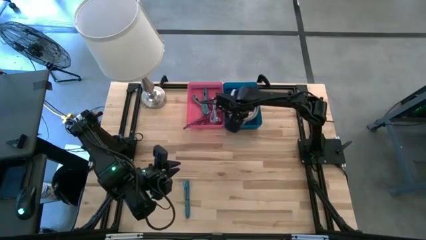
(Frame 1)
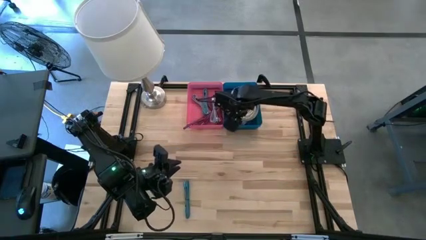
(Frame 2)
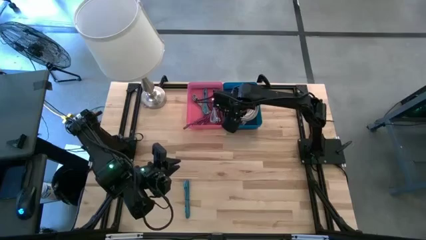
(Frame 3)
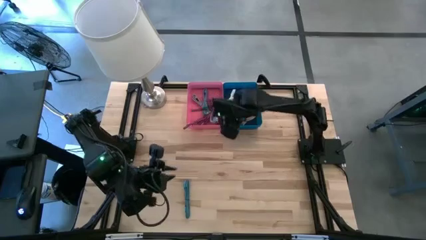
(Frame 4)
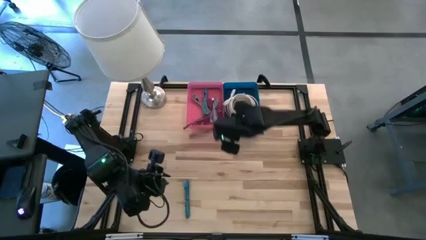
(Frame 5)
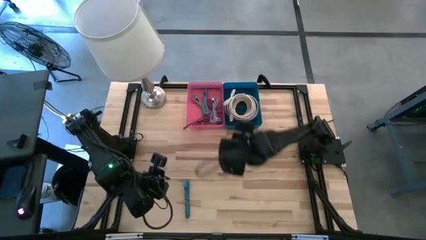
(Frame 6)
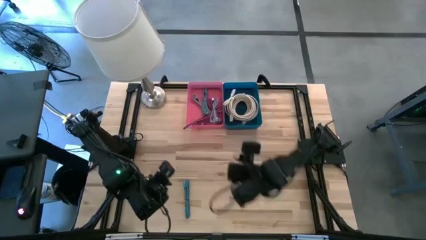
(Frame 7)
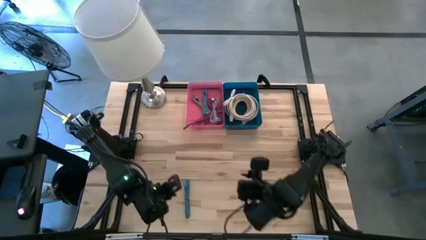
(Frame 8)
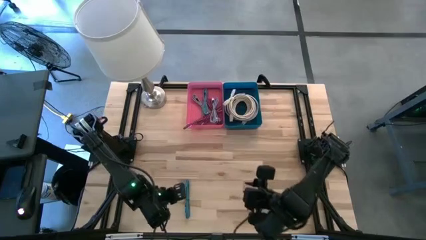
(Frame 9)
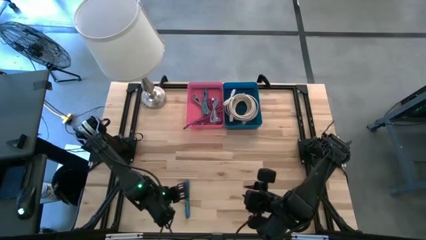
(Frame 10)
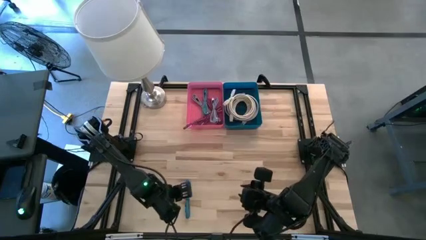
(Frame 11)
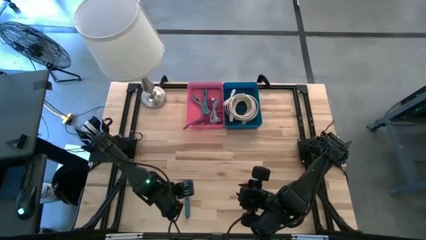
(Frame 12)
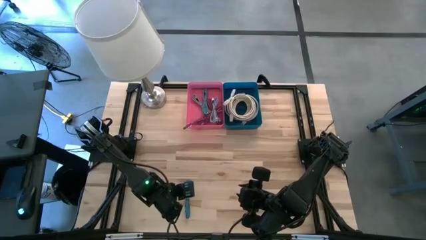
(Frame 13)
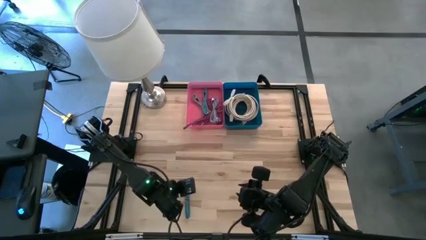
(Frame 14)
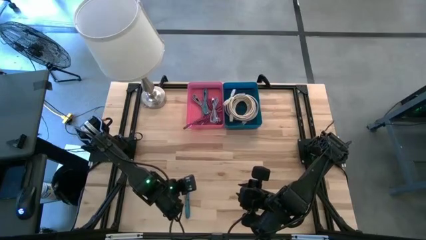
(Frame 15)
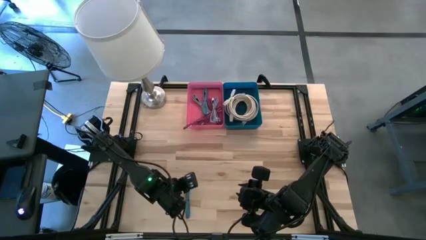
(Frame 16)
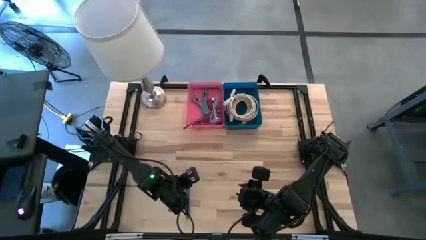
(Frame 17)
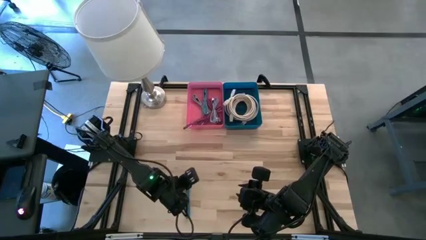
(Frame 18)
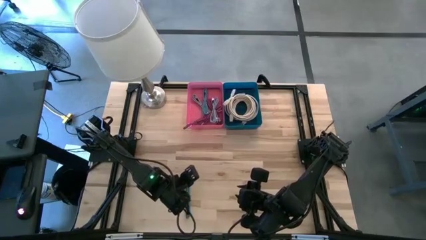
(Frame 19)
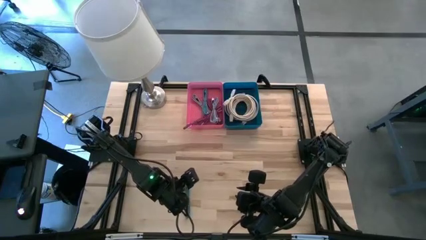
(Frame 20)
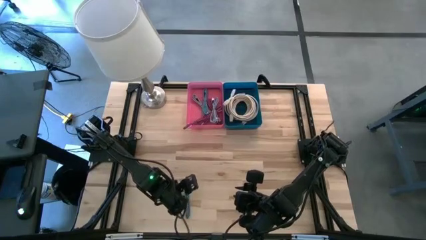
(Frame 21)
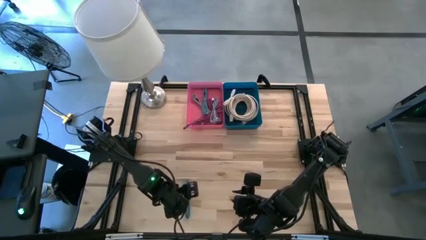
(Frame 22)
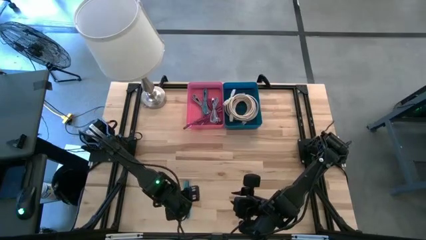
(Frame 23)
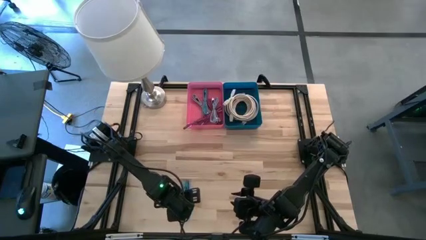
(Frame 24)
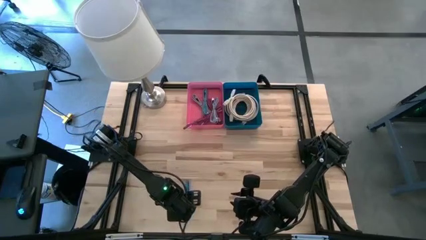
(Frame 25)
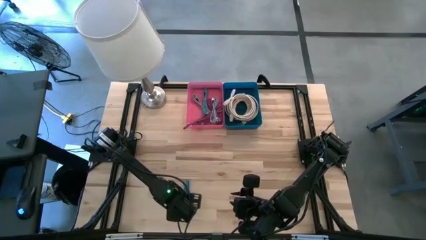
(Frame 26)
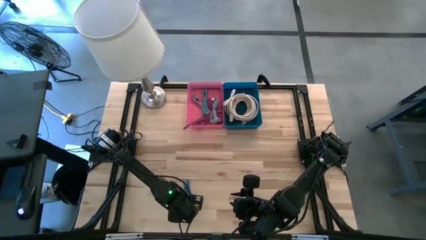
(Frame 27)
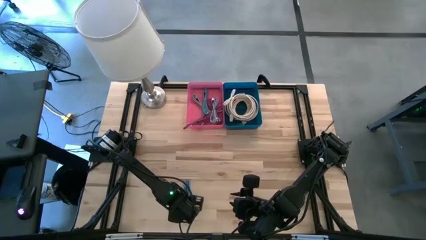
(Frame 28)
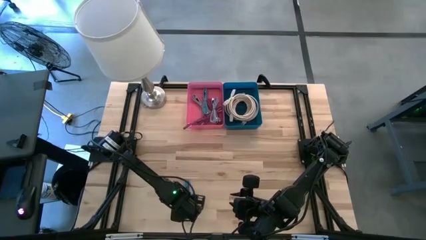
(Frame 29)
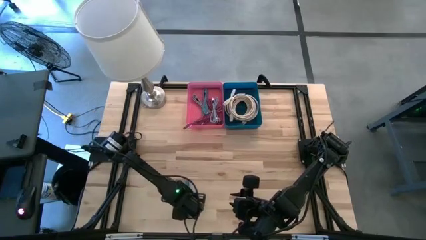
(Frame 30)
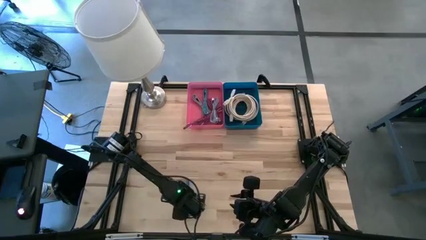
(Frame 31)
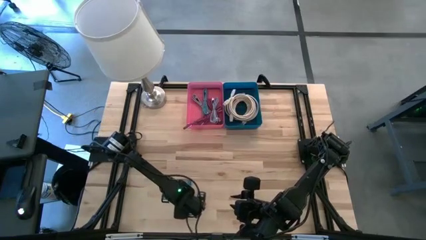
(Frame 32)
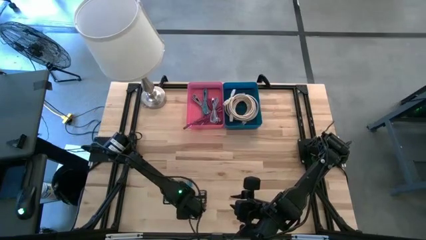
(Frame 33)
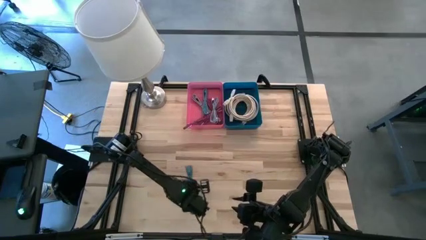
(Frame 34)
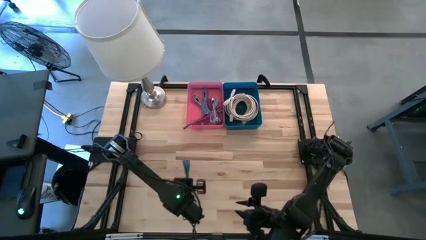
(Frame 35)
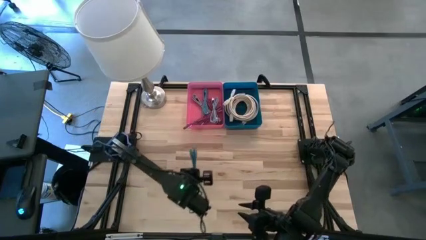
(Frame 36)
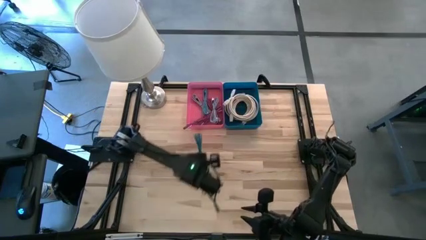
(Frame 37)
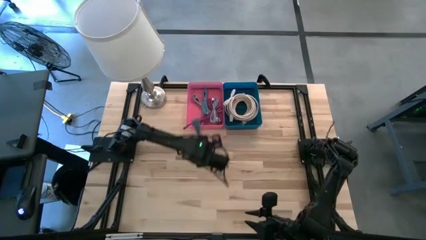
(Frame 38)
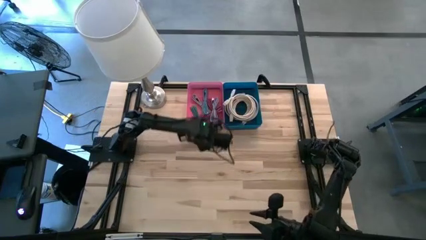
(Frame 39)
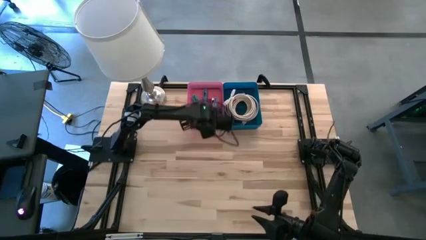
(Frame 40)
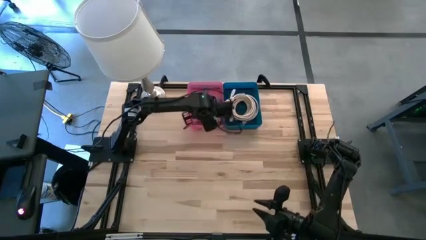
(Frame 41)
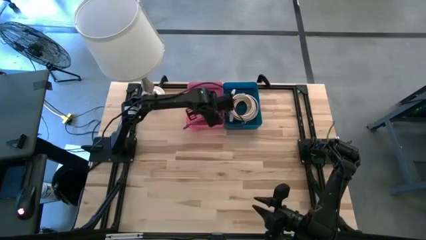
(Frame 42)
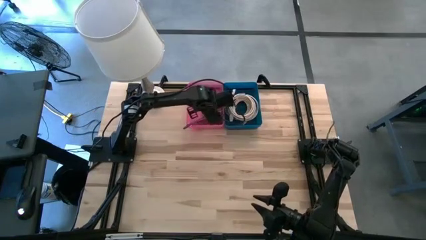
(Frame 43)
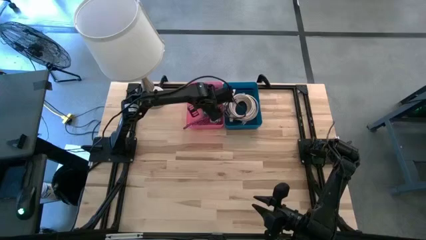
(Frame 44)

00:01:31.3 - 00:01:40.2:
Task: Pick & Place USB Port
Put the blue charger cable into the pink bin

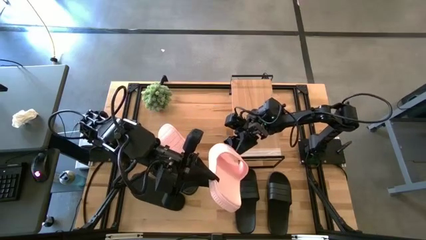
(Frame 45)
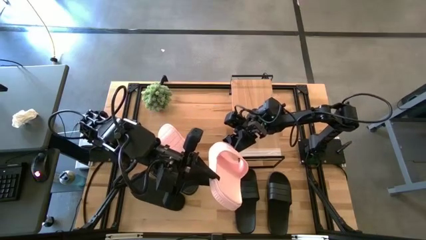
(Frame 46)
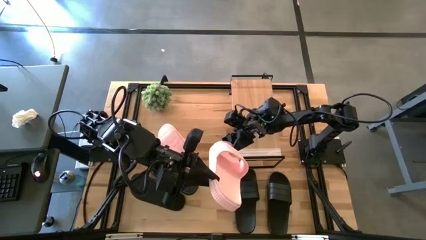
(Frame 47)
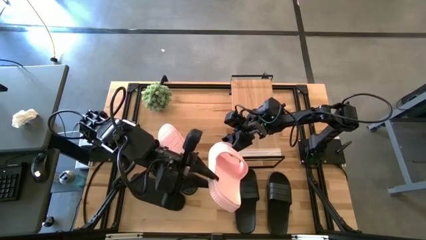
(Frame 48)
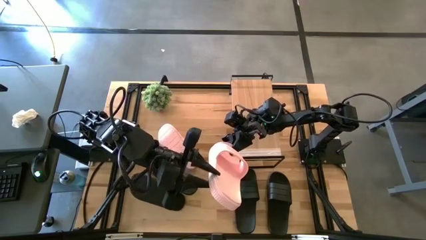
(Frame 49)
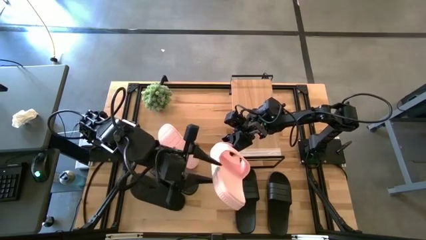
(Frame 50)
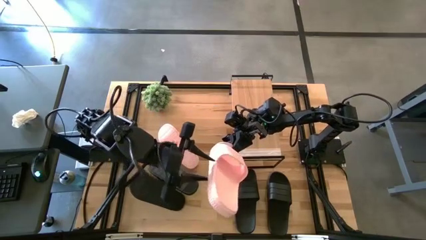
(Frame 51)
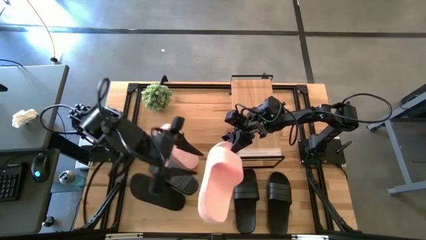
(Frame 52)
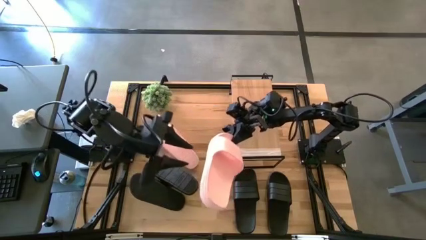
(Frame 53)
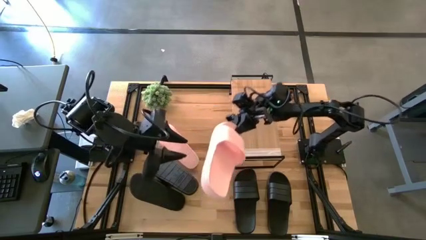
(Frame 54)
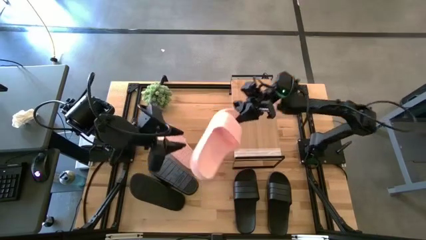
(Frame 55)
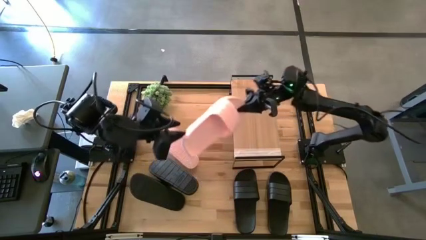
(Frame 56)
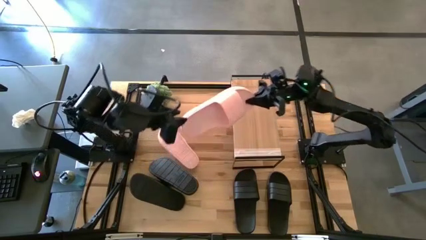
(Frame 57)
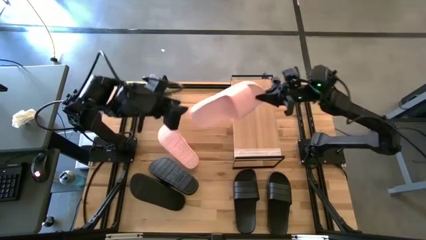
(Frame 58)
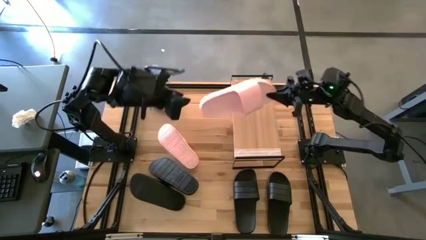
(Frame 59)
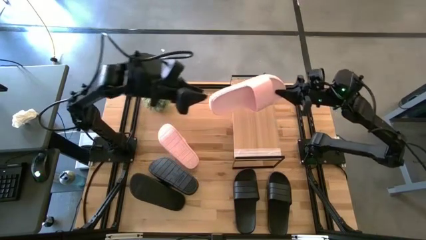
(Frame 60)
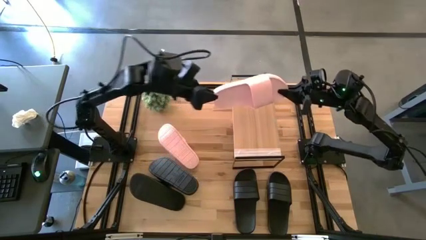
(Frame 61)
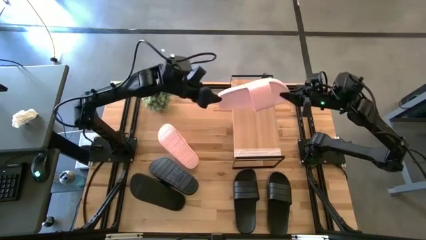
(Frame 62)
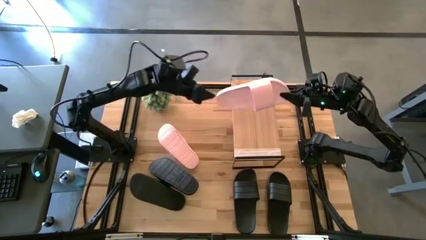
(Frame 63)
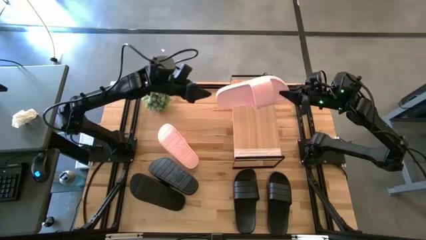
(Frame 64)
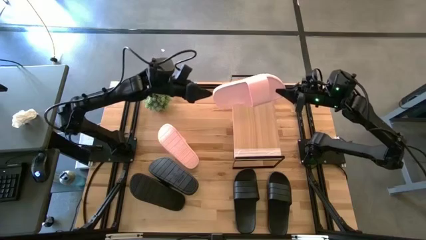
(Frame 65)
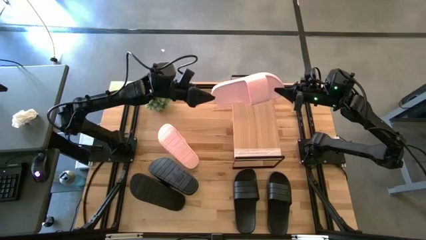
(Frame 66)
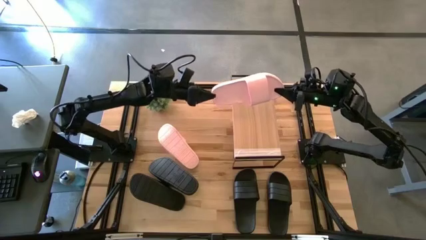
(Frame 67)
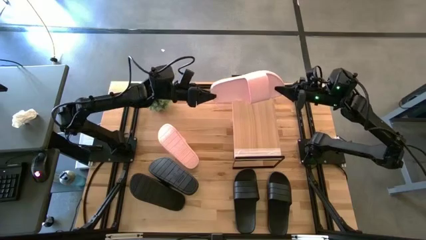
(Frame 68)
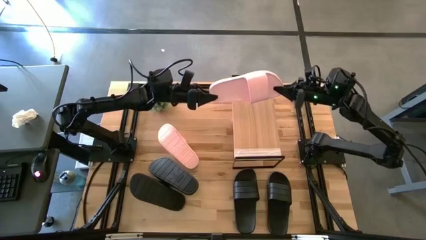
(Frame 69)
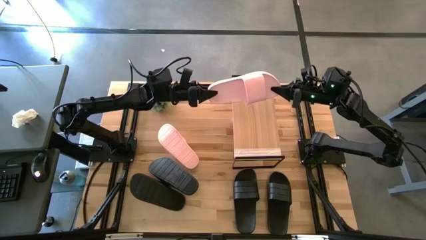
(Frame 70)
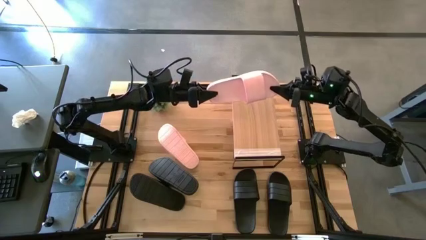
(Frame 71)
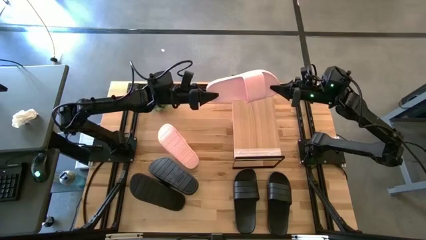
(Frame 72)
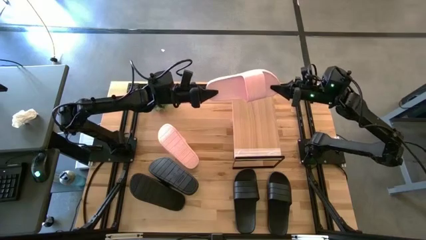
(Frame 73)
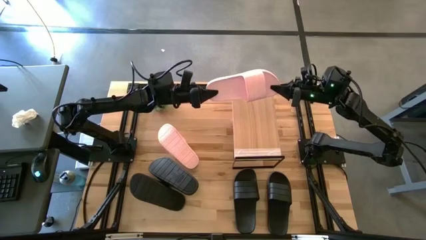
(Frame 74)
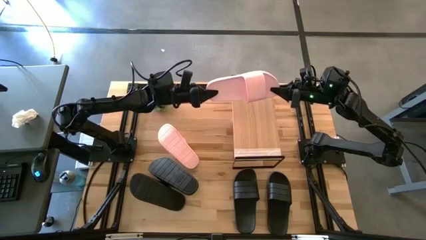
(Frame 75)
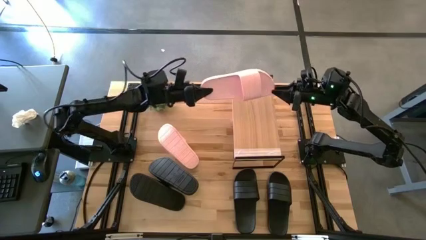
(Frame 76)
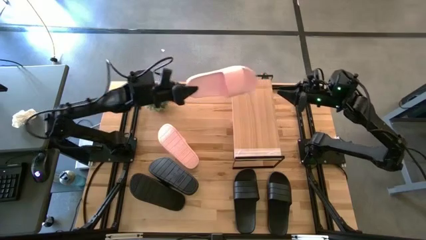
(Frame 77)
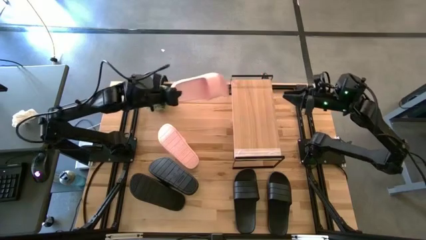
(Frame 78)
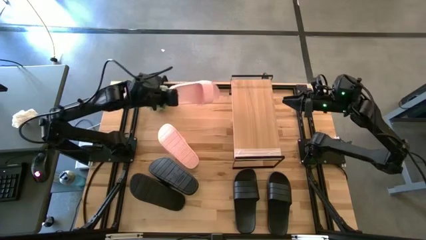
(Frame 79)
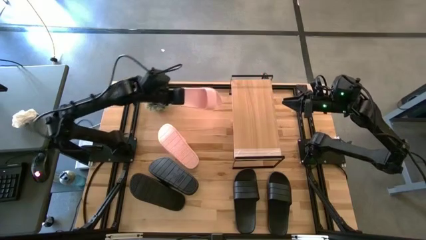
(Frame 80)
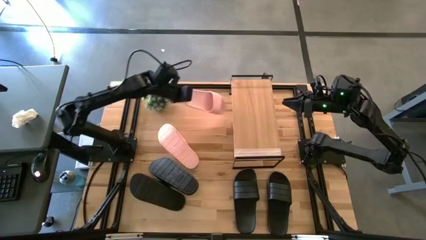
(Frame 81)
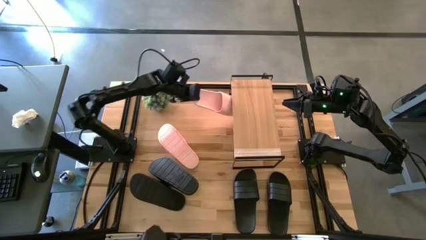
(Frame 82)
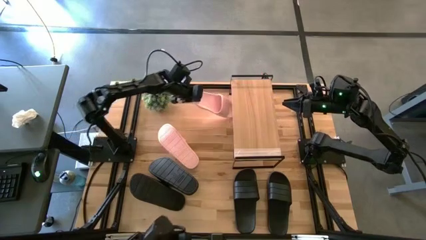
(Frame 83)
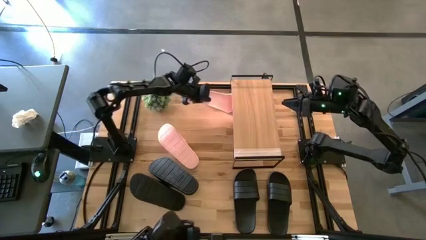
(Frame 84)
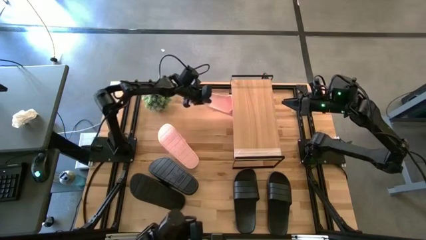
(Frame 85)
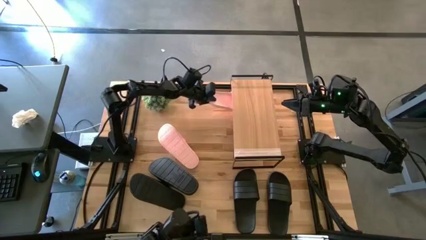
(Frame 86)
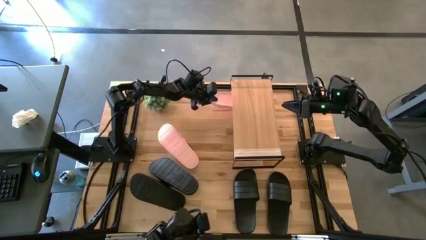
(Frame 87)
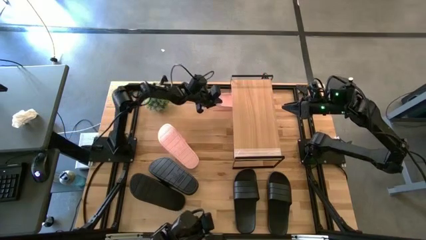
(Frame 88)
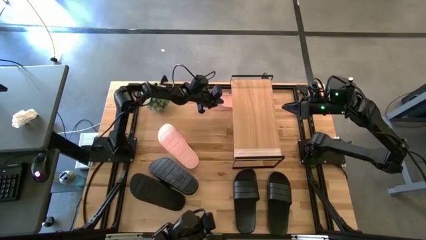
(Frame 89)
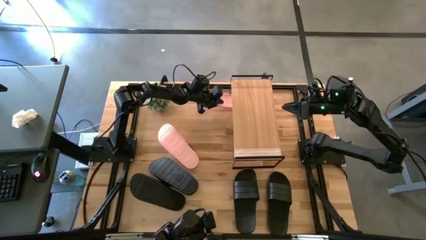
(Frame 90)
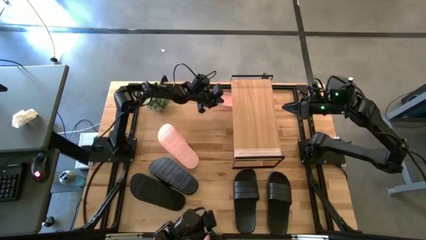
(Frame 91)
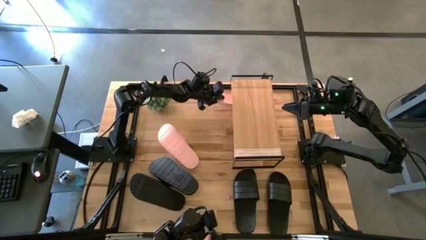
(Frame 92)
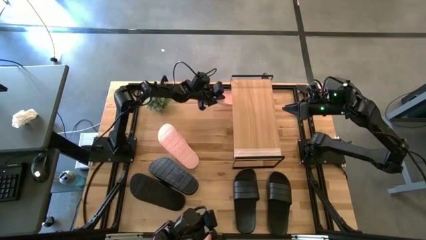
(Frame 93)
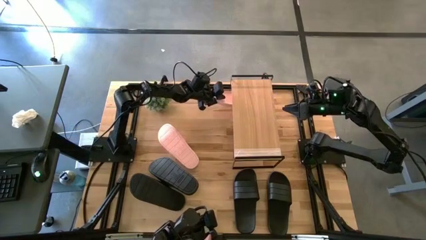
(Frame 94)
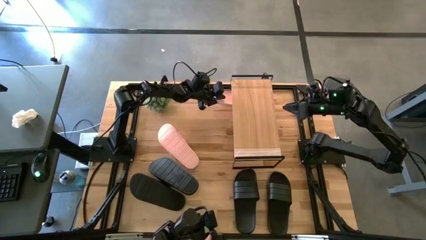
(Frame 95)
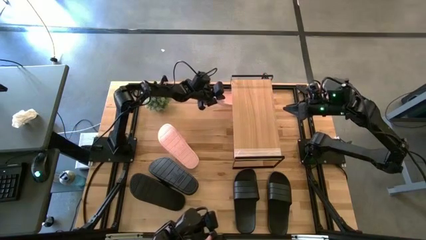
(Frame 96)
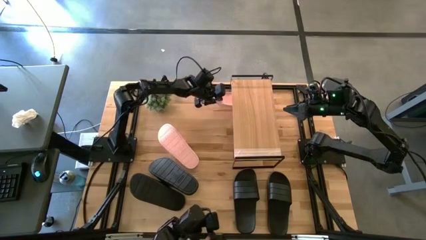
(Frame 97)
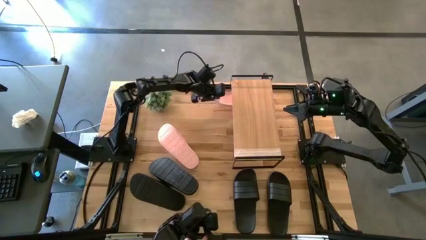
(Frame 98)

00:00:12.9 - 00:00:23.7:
Task: Pick and place slides into the shelf
Put the pink slipper under the shelf
